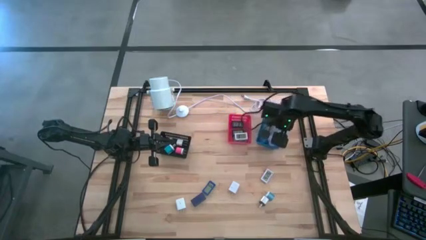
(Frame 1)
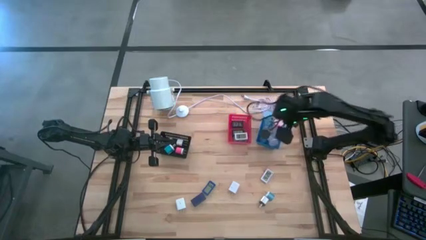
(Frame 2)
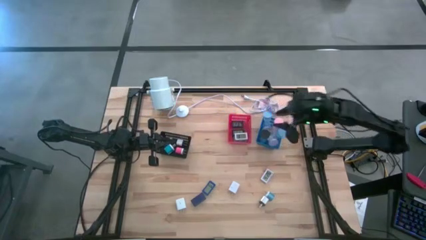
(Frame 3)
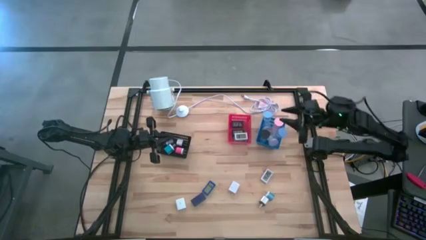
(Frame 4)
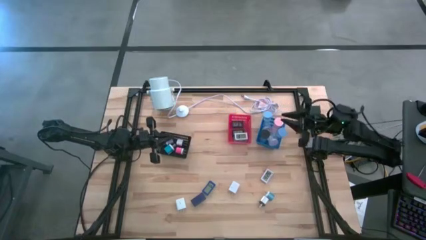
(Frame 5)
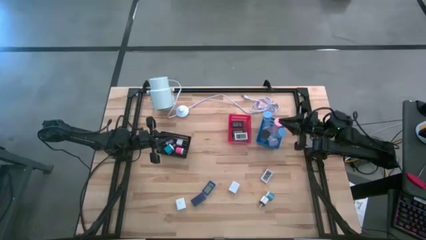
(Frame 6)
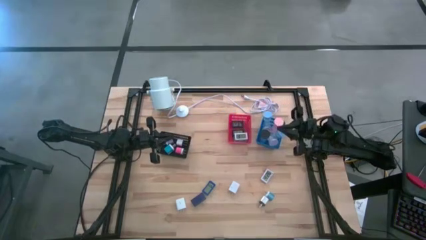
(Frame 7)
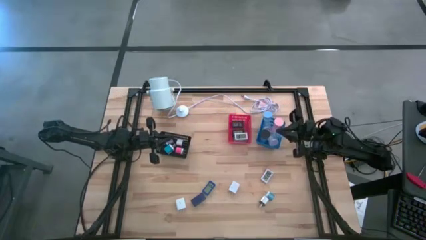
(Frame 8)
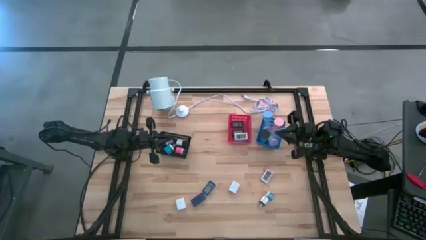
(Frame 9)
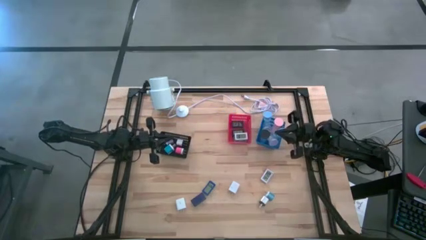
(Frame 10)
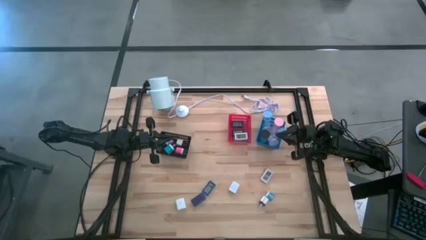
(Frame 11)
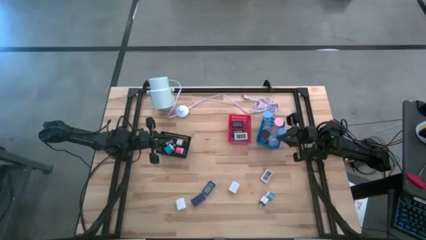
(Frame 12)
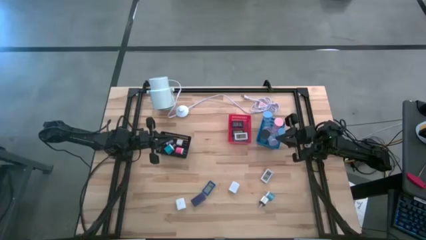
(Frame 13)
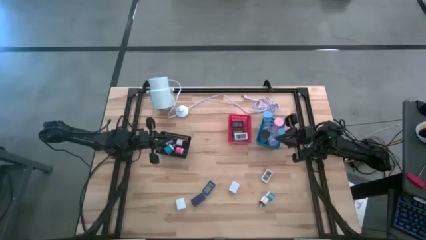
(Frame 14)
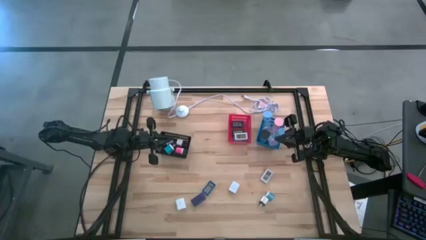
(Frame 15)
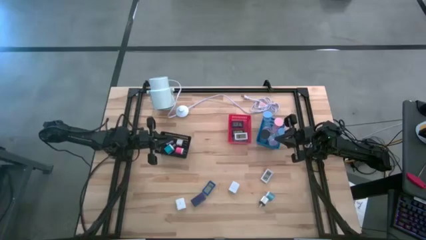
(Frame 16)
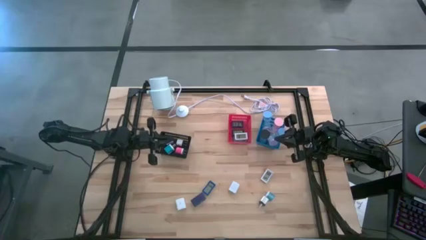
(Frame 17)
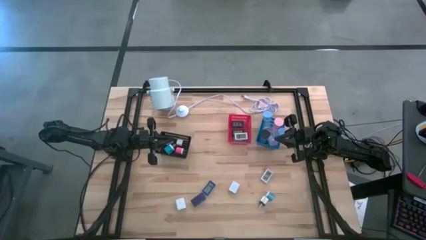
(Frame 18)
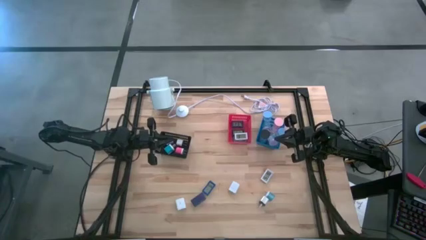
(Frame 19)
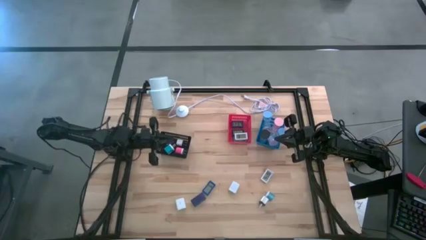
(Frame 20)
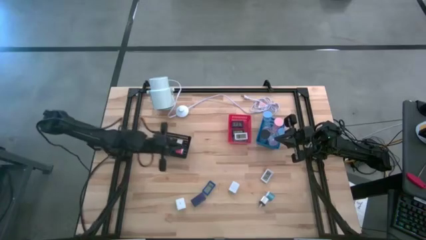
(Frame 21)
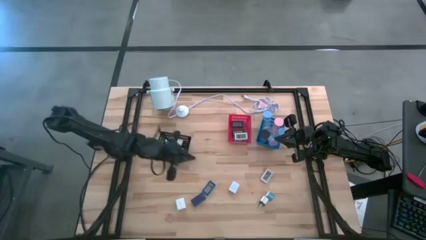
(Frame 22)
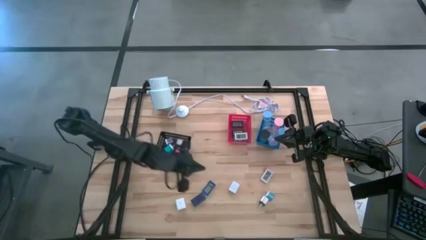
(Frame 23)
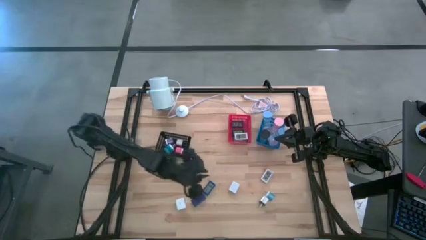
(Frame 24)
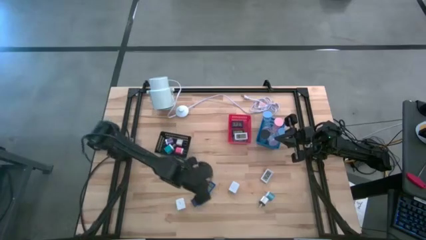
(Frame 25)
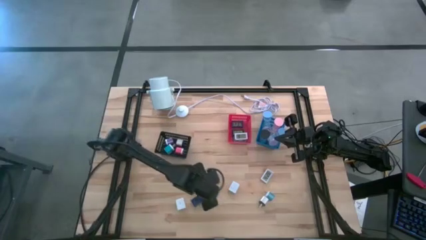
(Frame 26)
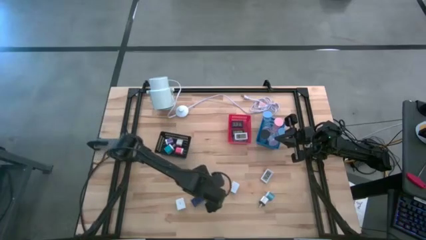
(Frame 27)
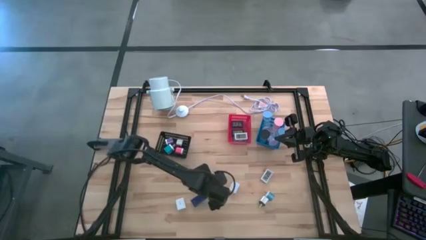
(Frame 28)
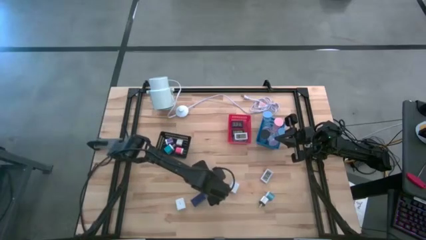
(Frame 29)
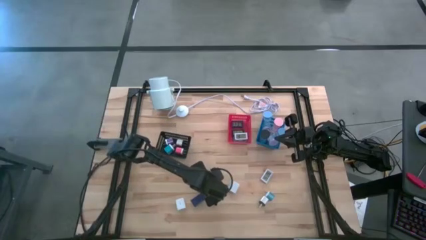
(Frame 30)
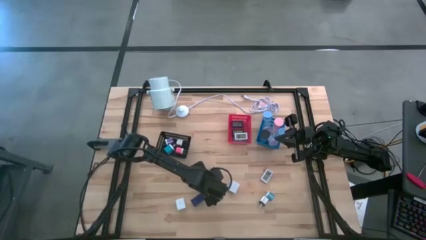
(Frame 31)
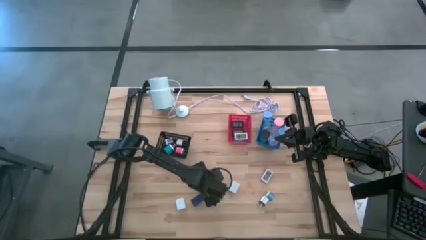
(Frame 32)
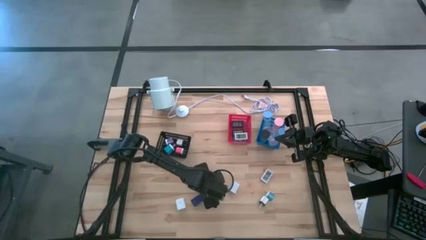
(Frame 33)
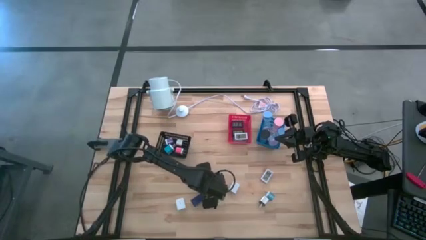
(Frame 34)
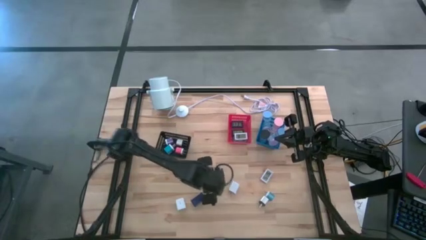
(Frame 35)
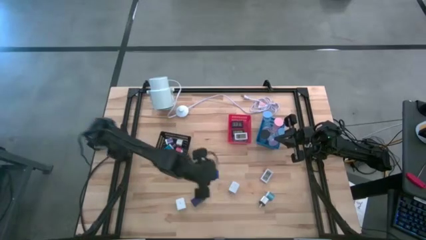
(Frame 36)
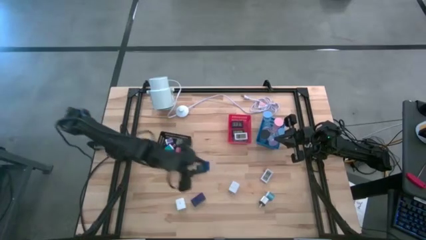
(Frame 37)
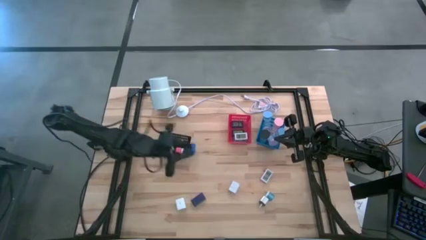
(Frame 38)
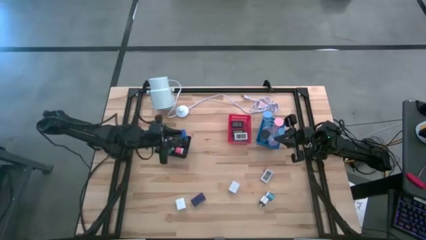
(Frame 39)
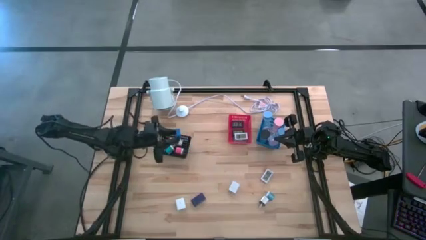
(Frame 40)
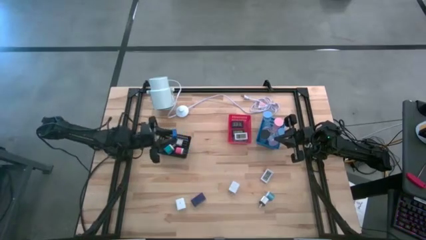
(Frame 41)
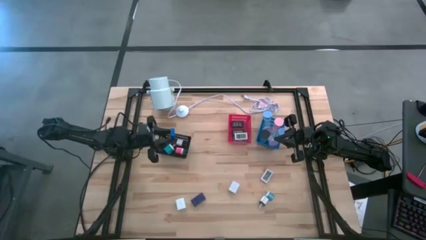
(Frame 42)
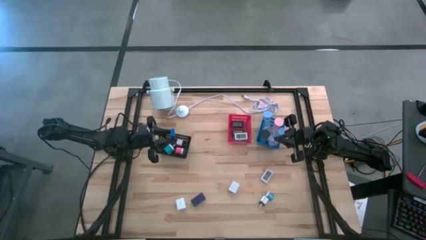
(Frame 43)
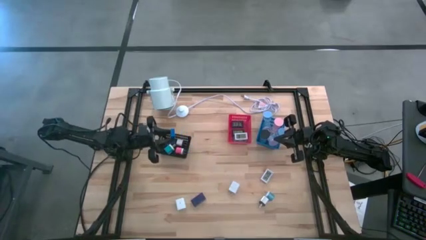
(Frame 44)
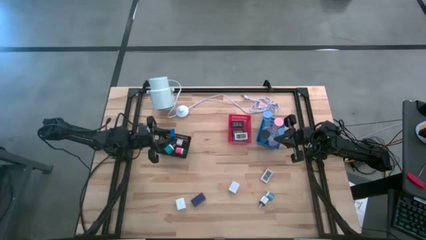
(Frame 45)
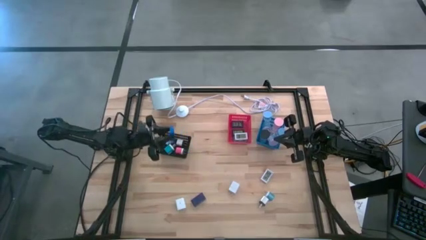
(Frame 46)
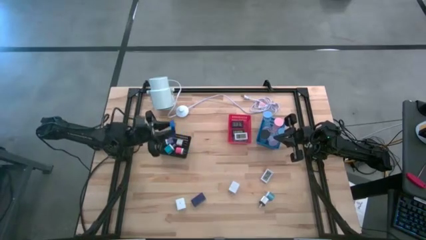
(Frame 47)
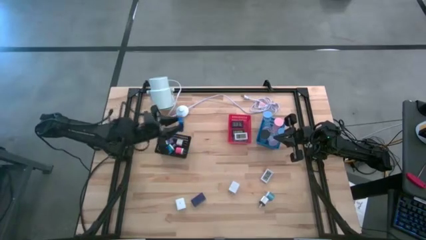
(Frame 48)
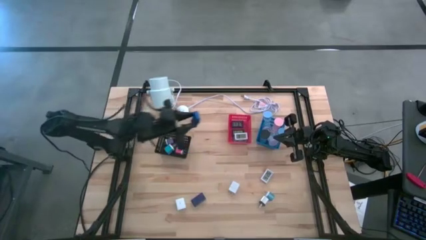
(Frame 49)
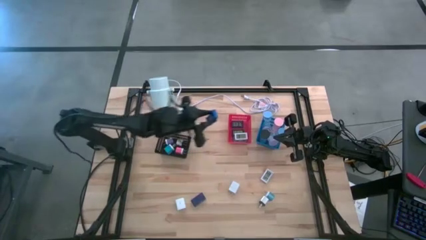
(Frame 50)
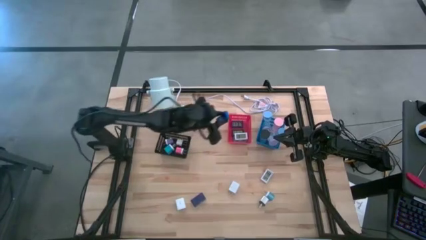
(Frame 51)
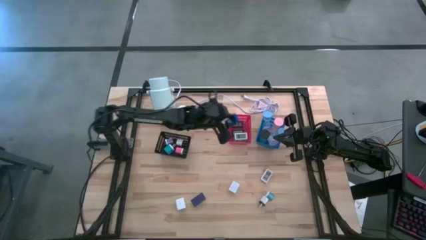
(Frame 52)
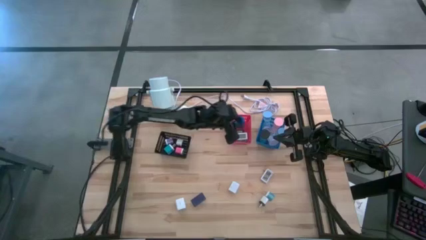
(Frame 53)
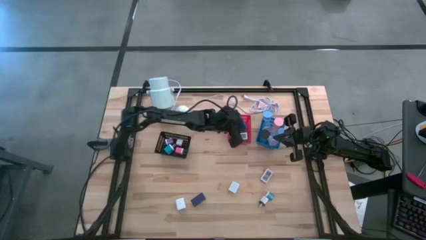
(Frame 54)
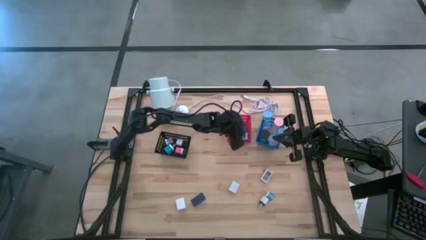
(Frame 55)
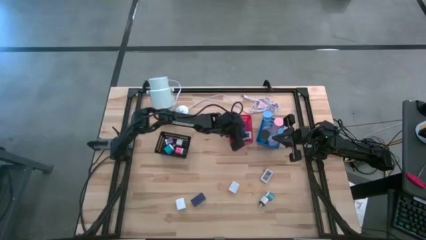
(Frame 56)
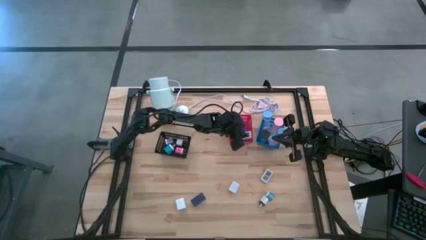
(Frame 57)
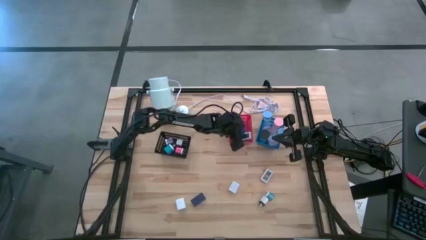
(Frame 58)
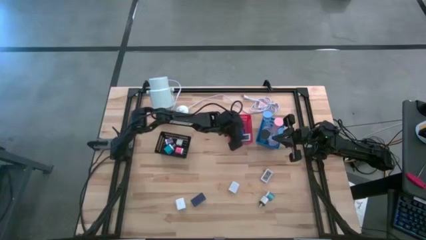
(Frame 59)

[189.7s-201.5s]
Task: Pick & Place Office items
Put the right dark blue digital clock into the red bin

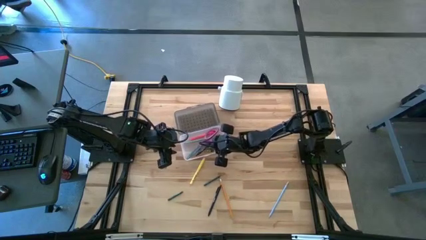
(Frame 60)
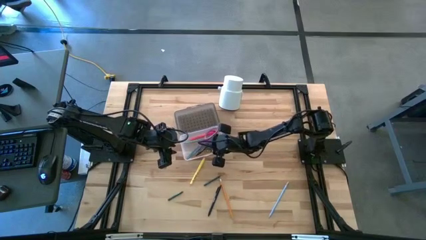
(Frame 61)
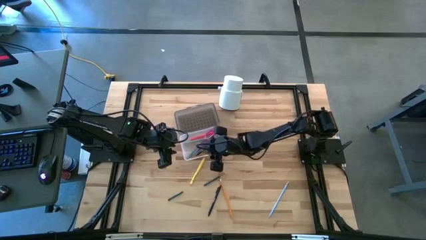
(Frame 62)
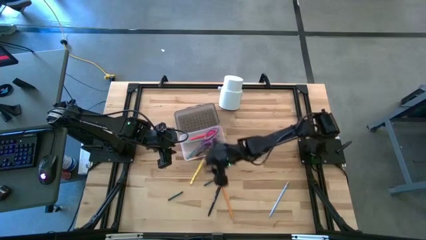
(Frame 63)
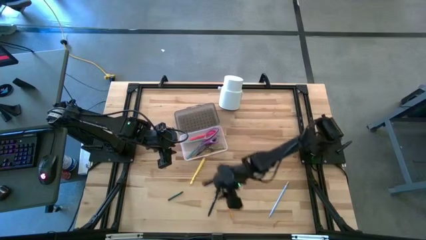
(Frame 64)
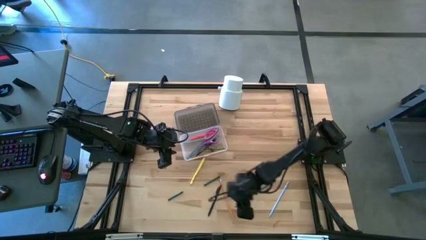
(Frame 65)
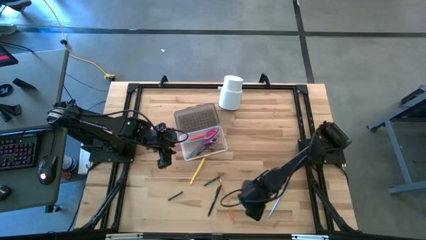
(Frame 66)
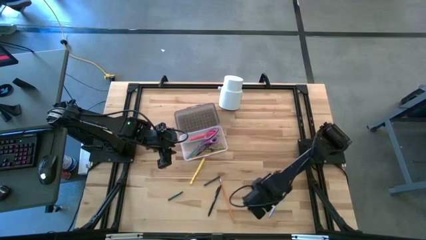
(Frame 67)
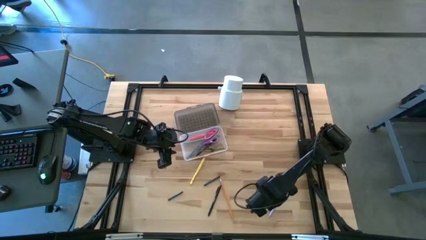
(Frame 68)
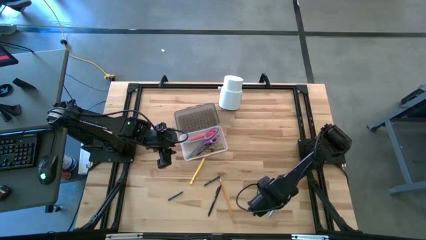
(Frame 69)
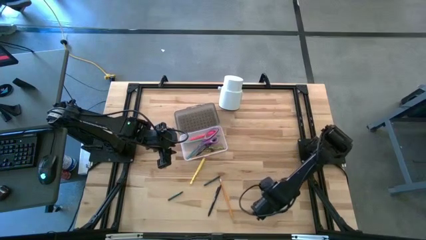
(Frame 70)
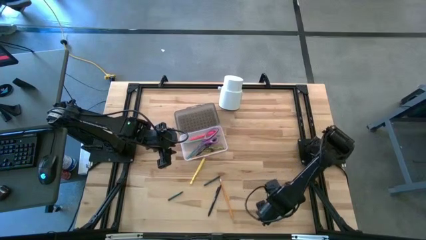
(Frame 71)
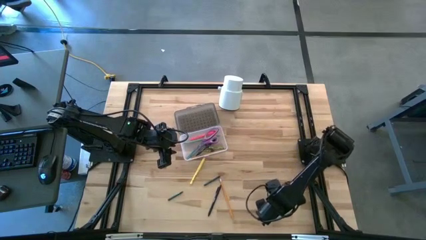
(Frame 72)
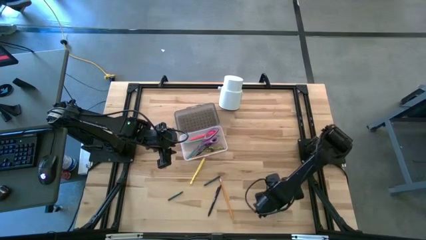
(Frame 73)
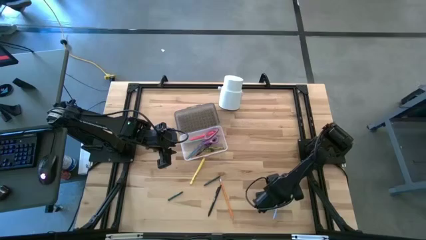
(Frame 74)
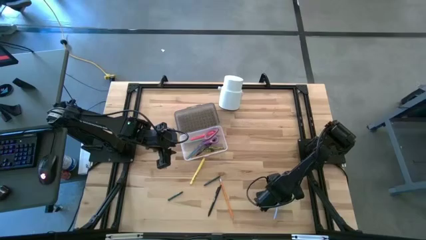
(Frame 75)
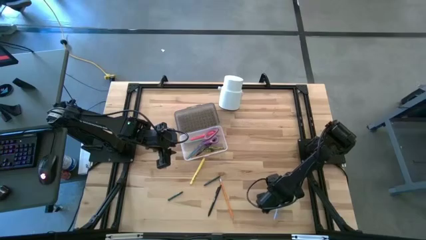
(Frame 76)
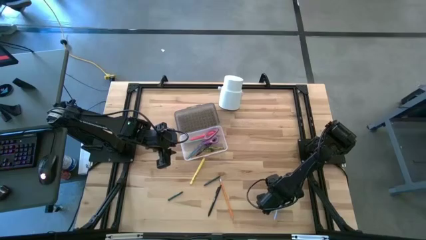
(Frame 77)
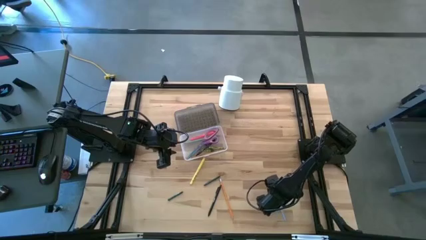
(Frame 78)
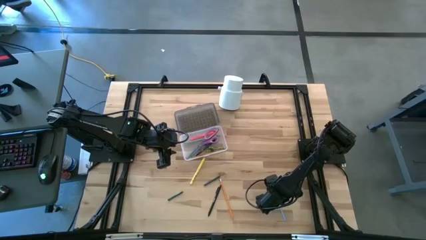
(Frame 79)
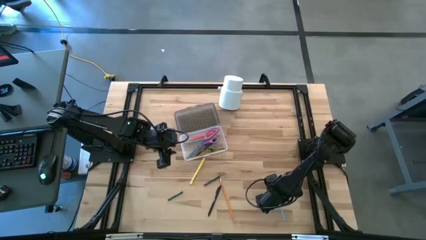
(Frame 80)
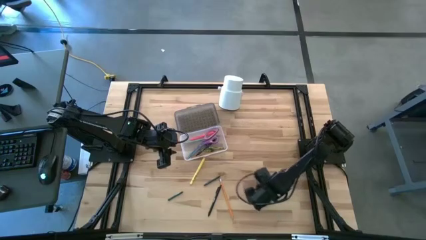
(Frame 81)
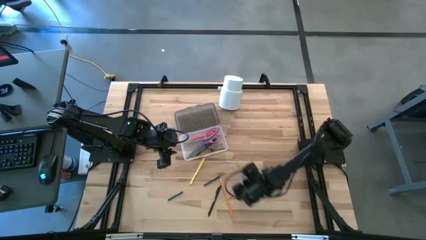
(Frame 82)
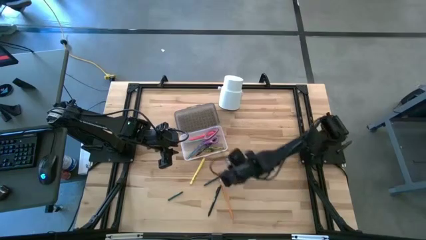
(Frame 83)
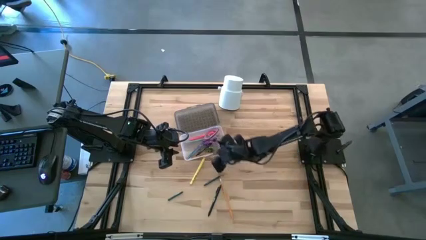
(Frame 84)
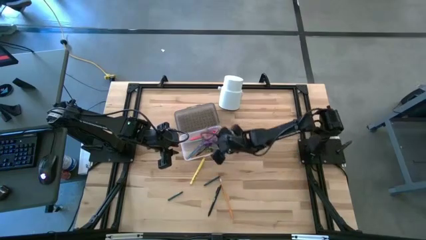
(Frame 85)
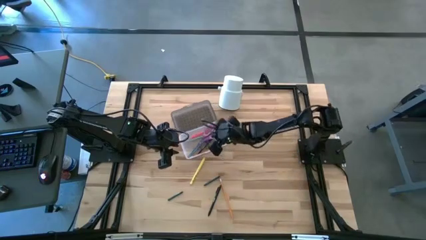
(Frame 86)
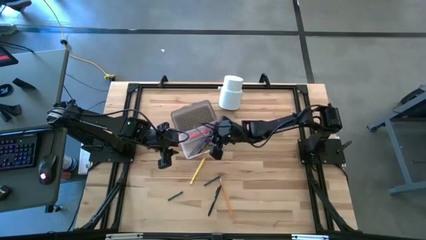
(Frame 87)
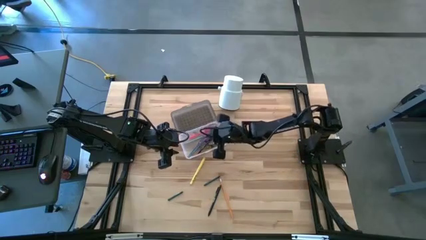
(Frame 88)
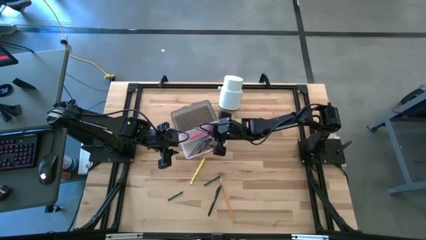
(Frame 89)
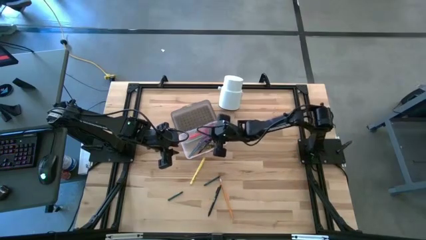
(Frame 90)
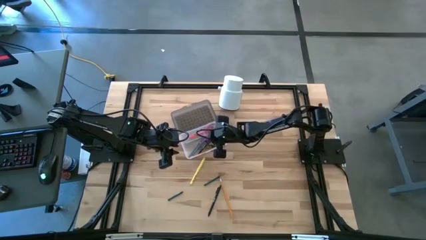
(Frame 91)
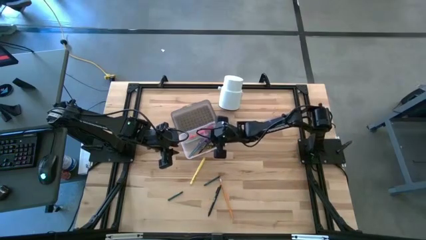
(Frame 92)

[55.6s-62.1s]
Task: Pick & place school supplies into a supply box
Put the light blue pencil into the black supply box
